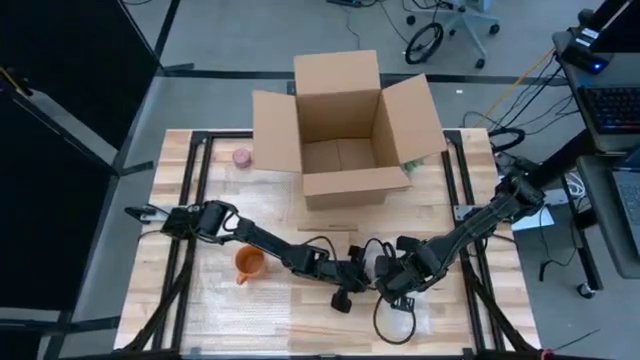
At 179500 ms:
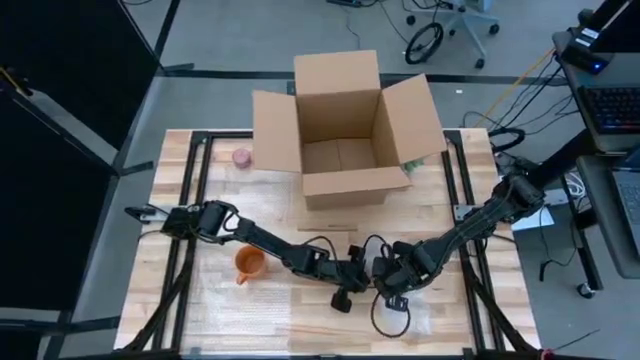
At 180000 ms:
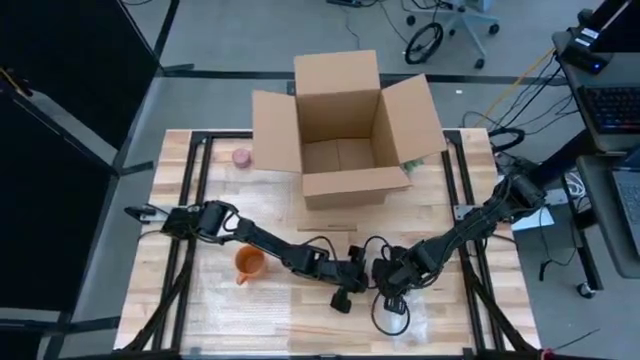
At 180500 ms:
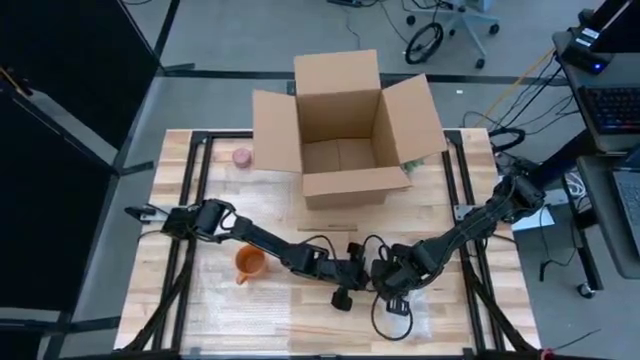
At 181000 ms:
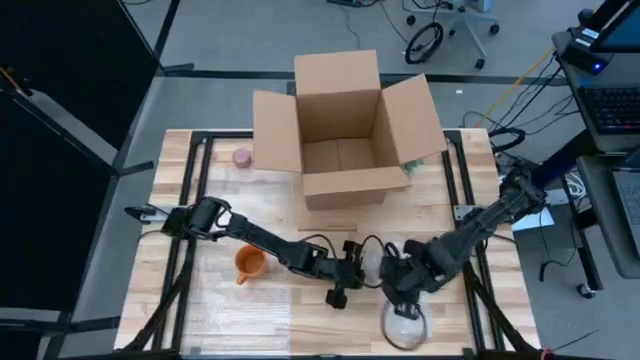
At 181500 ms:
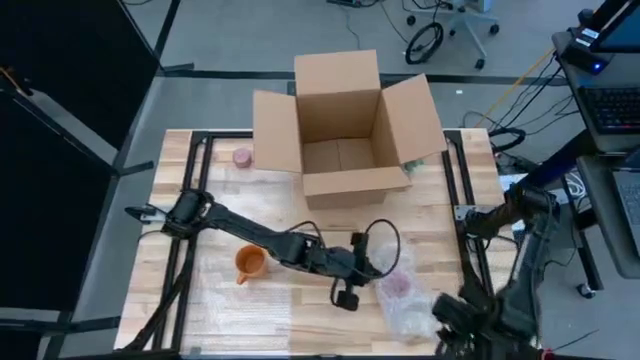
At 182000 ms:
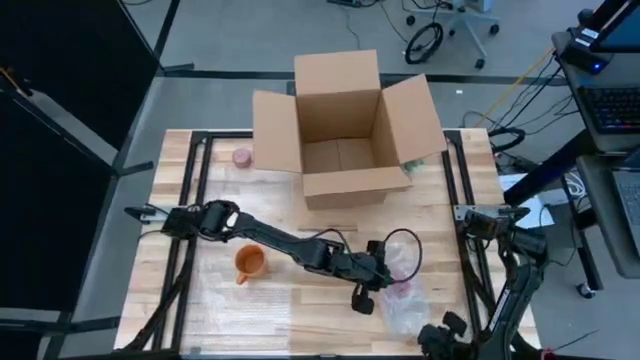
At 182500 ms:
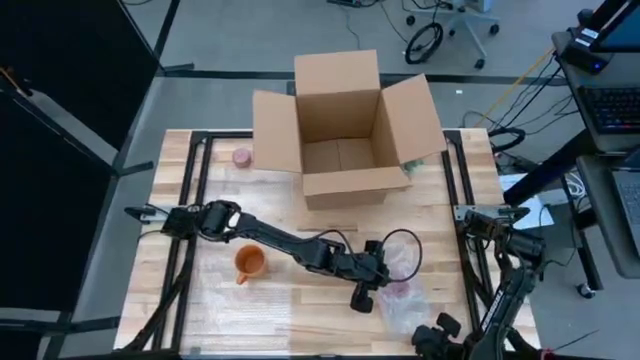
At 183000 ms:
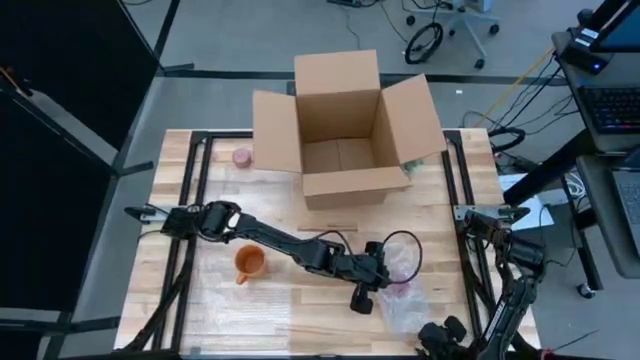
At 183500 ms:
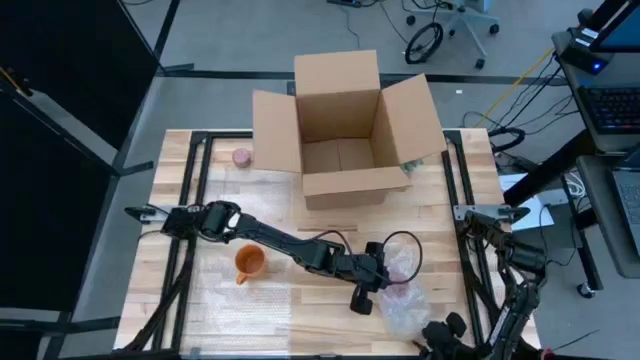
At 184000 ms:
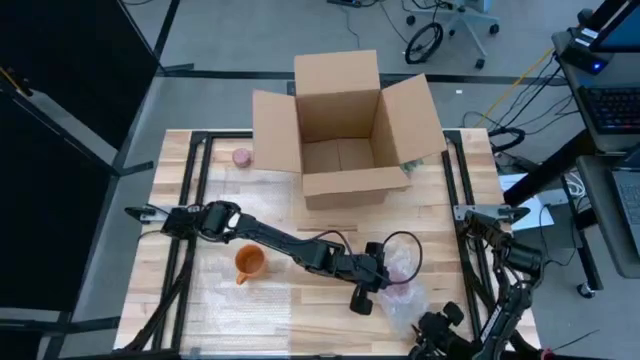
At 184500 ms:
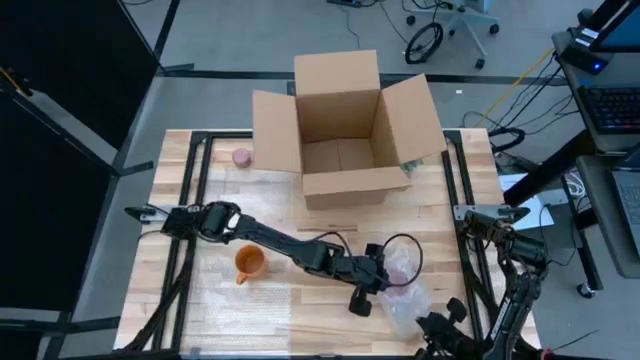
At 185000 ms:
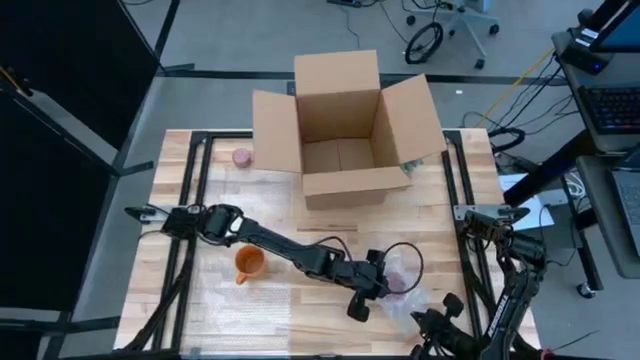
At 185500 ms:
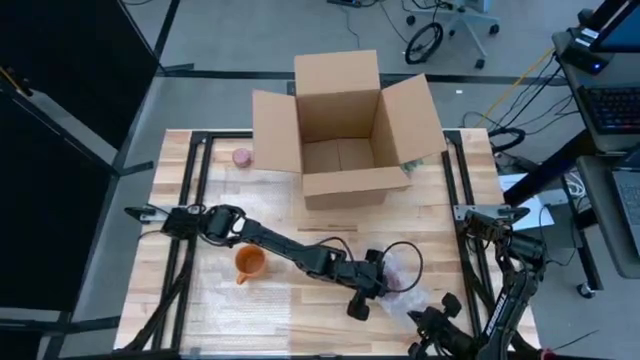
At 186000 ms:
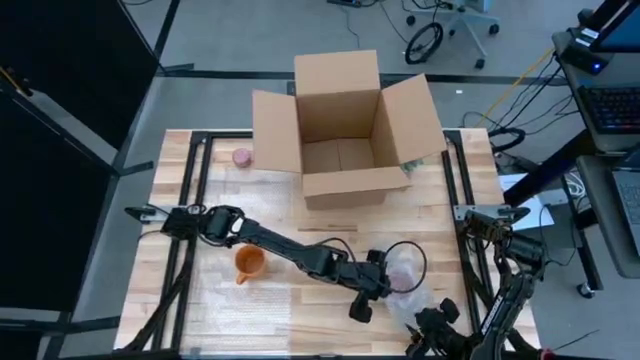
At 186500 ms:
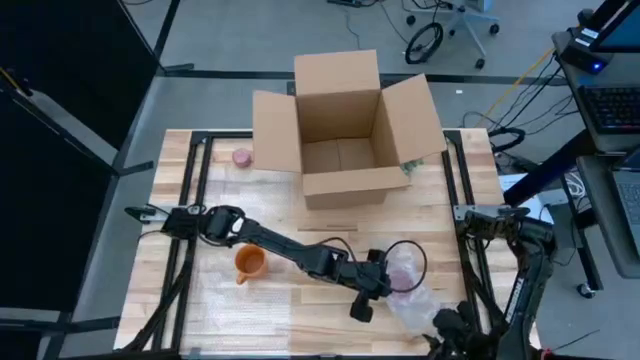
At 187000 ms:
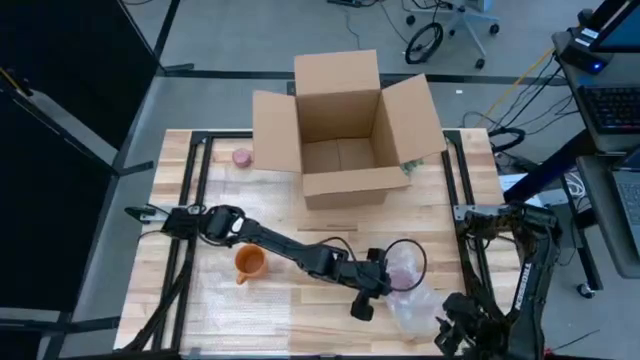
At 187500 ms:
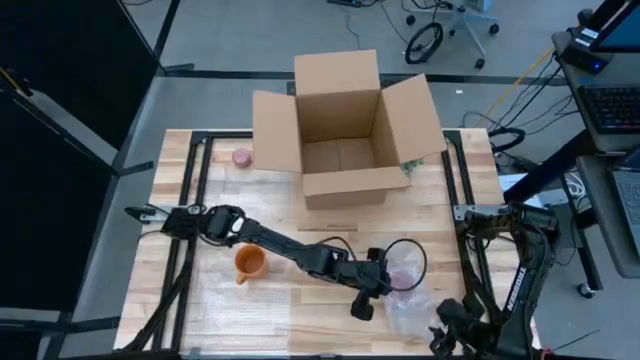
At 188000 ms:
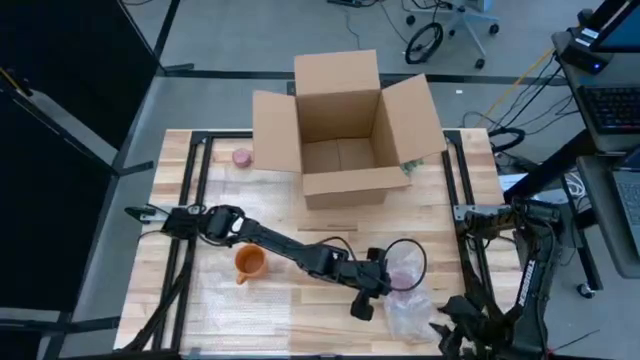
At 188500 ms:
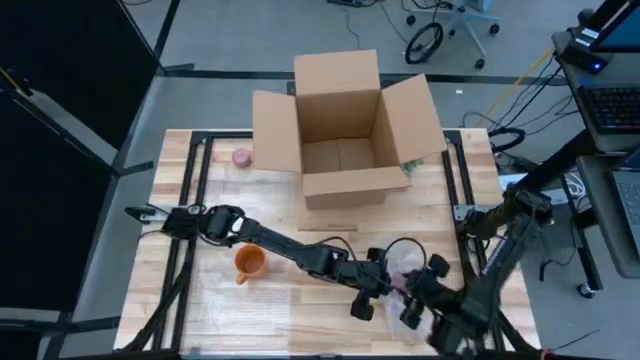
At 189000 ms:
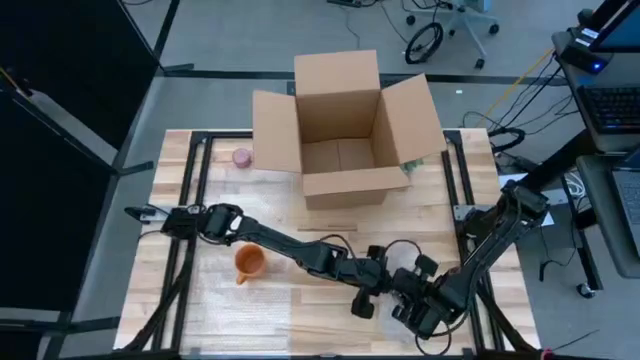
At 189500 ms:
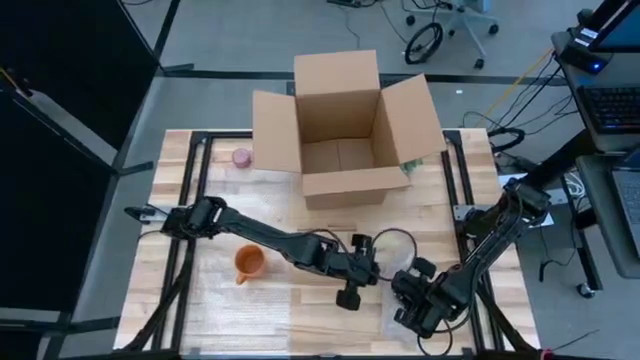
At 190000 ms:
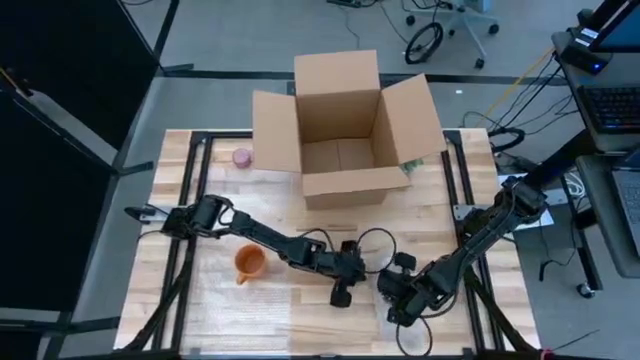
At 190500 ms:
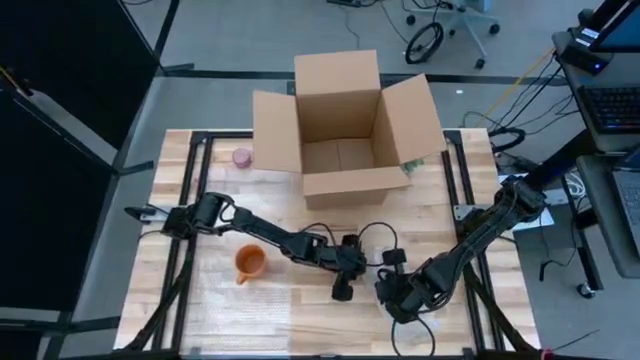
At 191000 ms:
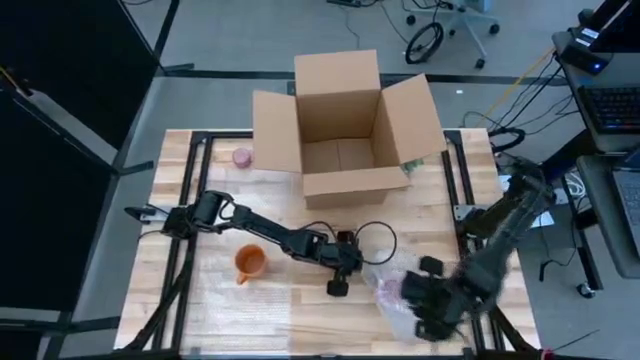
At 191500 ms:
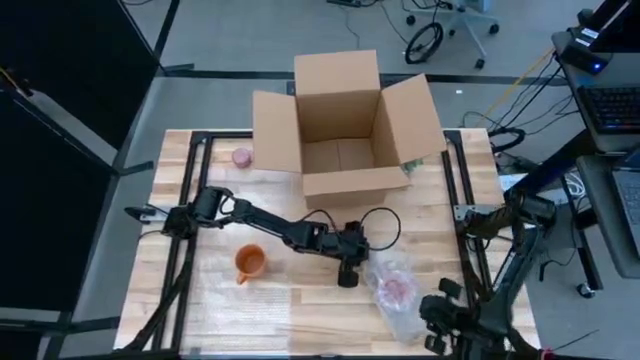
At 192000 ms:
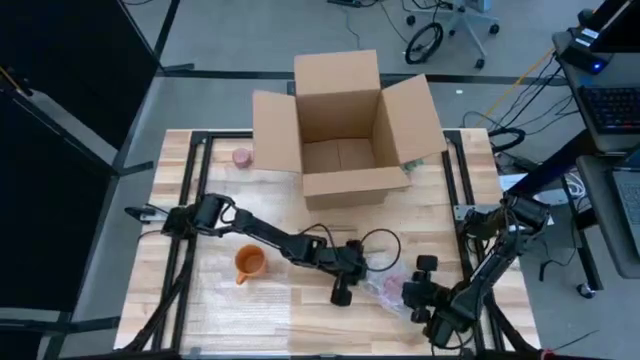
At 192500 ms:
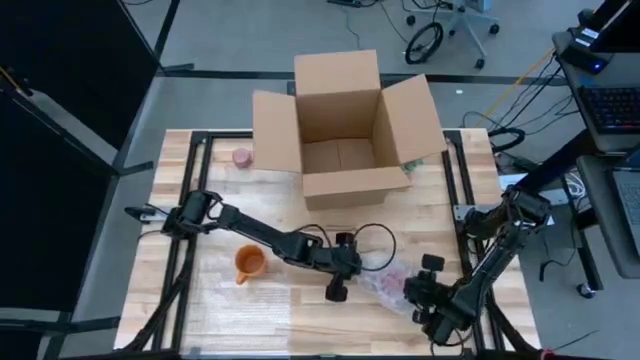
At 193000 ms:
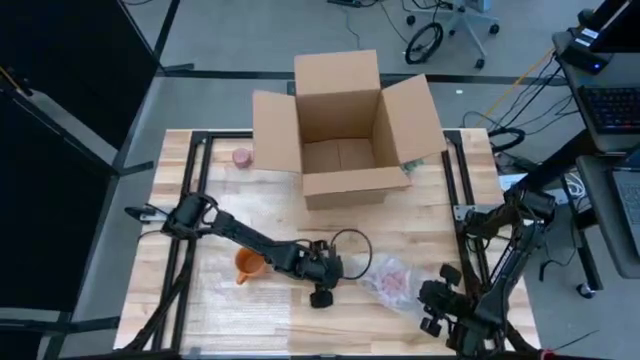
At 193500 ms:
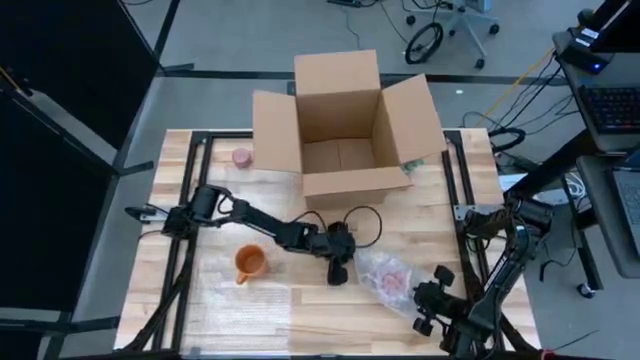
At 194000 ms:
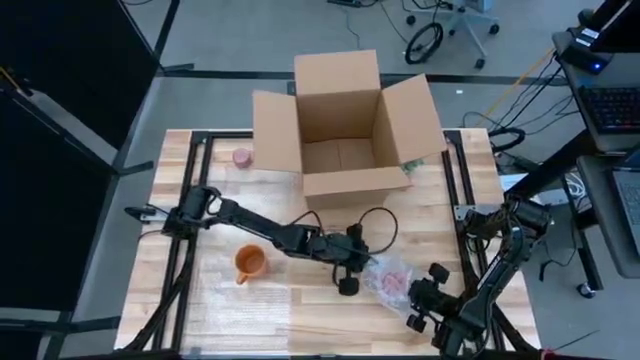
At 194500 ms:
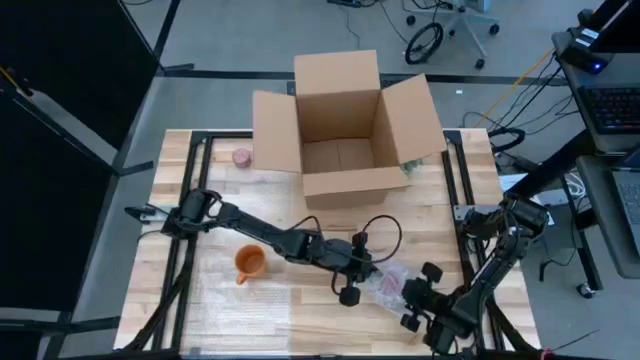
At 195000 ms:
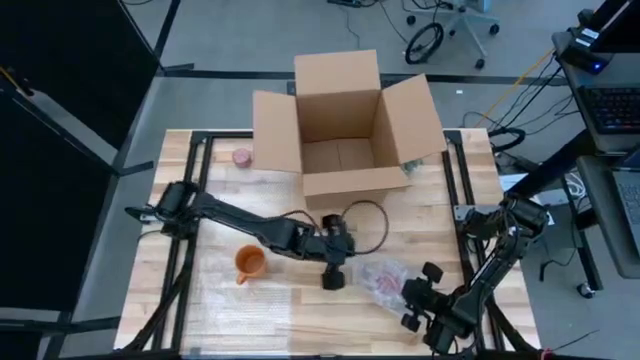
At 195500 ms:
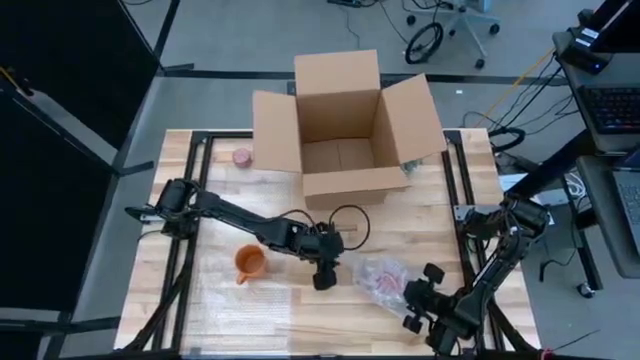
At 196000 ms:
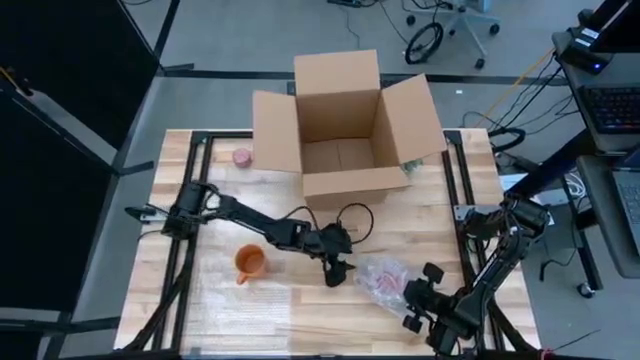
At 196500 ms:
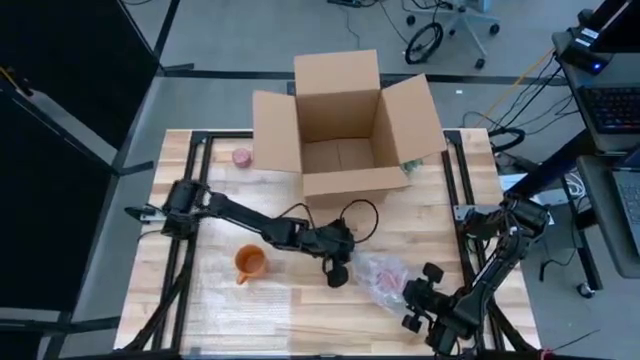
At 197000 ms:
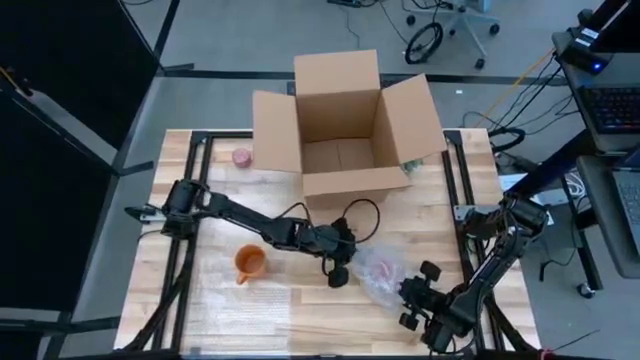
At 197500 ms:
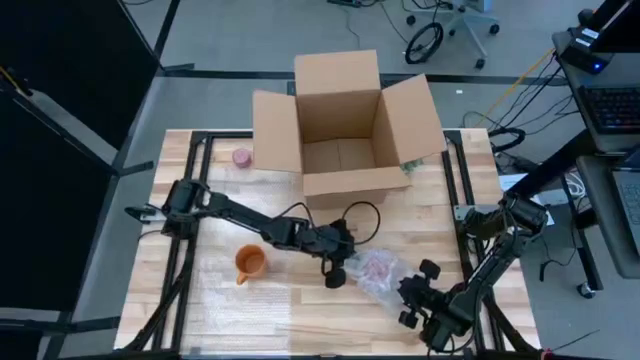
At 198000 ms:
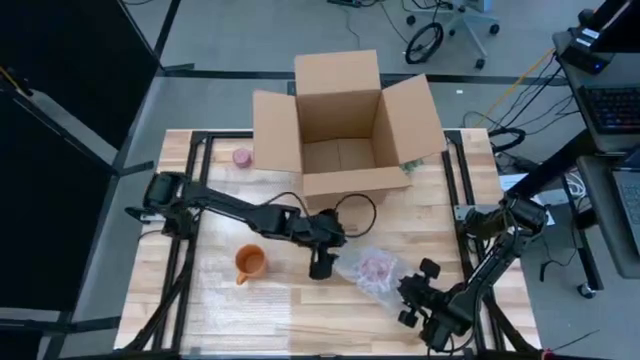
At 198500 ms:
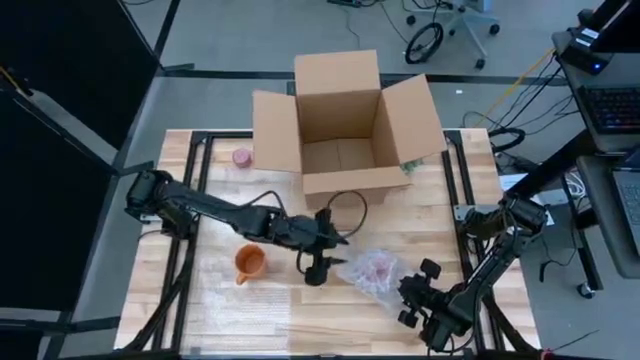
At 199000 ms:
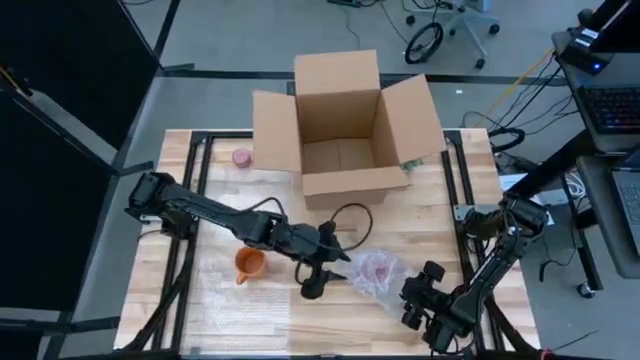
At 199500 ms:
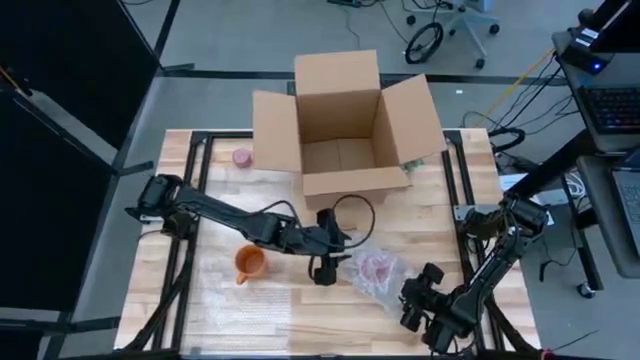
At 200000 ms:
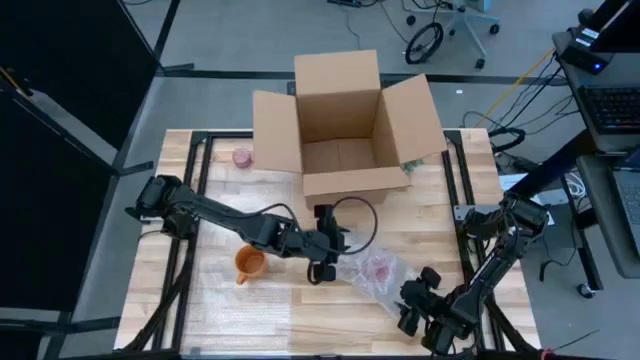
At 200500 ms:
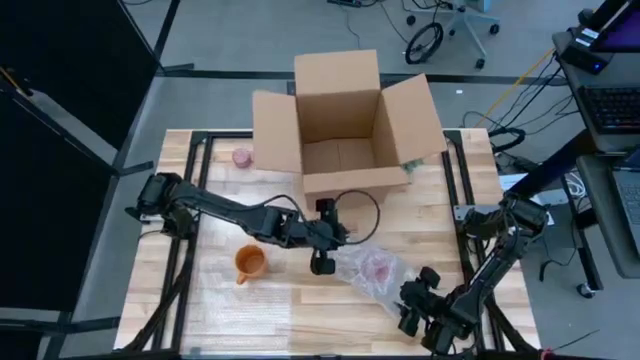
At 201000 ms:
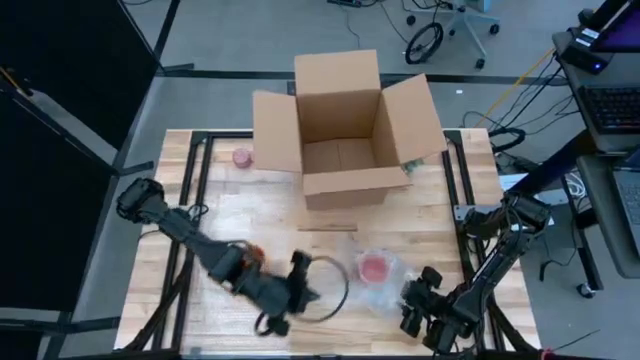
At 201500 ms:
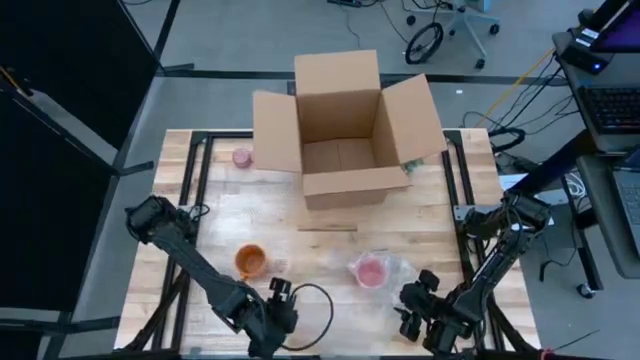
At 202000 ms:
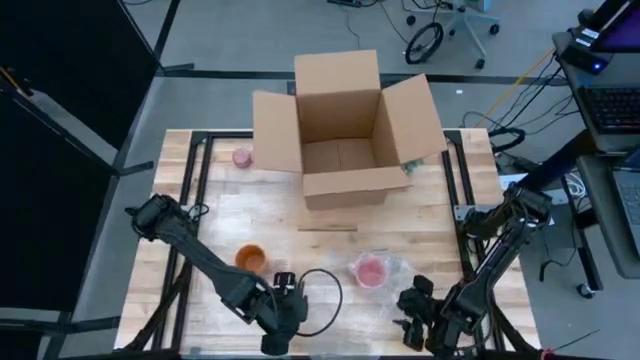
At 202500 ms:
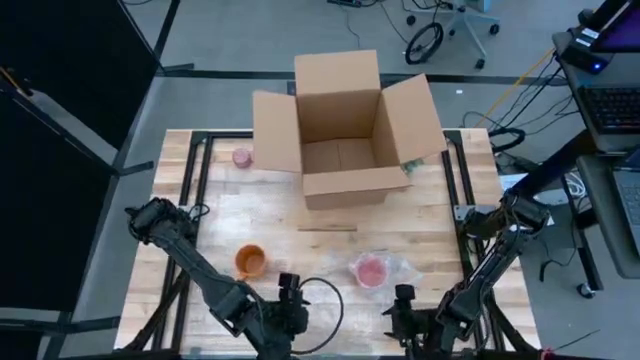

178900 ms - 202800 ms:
Task: wrap mug
Wrap the pink cup with the bubble wrap
